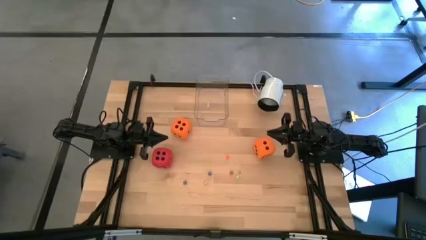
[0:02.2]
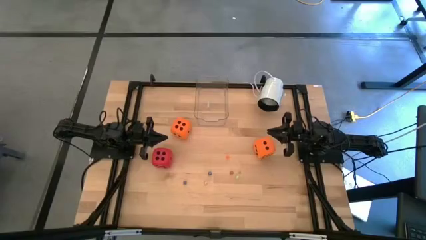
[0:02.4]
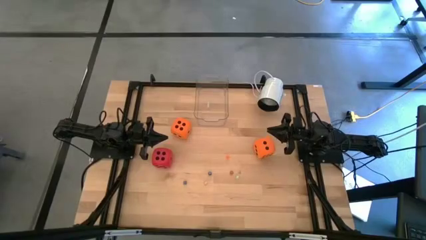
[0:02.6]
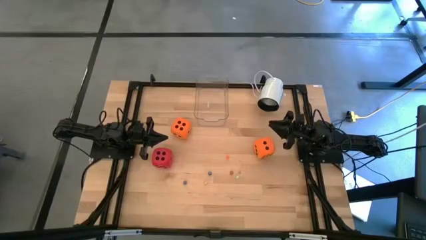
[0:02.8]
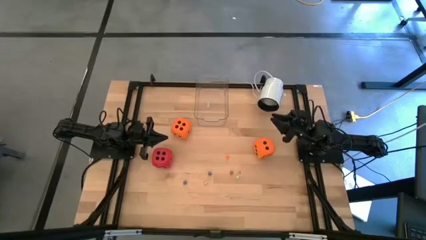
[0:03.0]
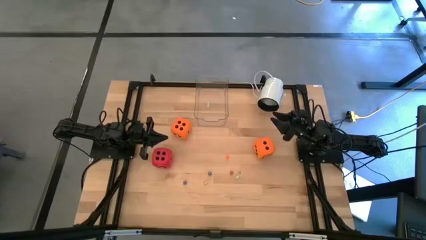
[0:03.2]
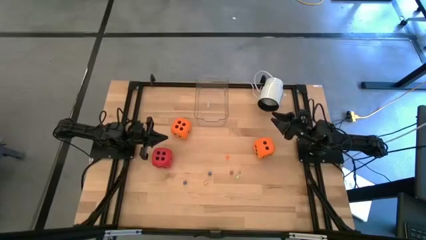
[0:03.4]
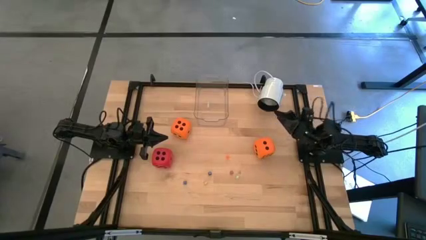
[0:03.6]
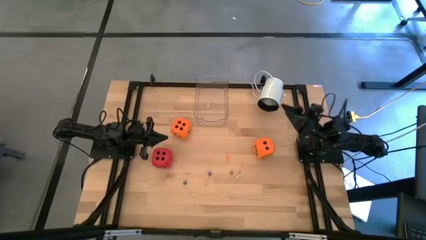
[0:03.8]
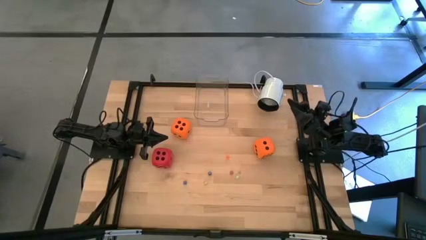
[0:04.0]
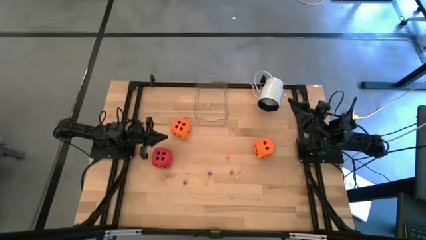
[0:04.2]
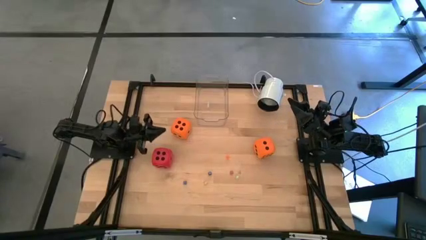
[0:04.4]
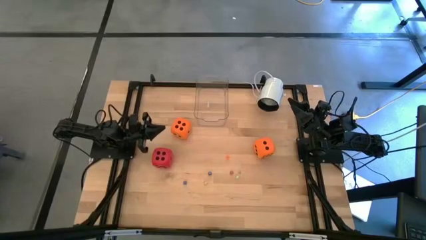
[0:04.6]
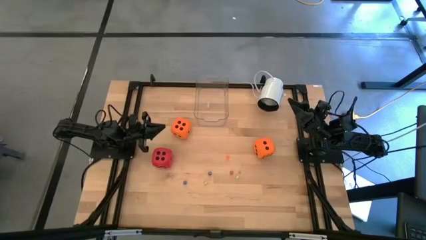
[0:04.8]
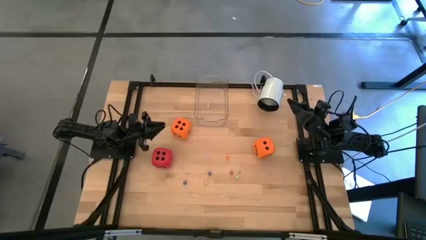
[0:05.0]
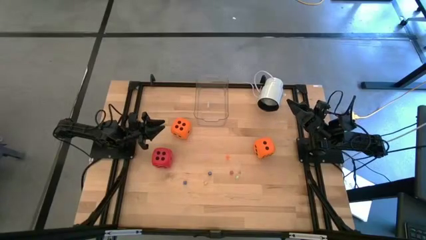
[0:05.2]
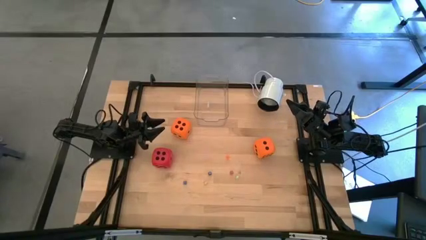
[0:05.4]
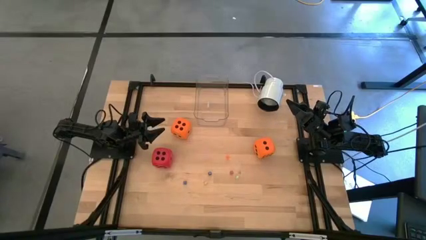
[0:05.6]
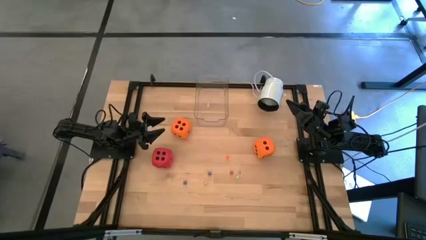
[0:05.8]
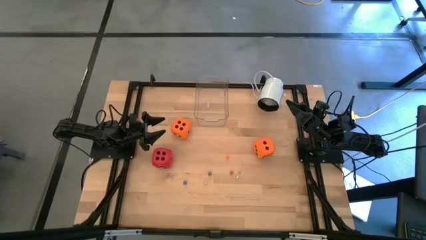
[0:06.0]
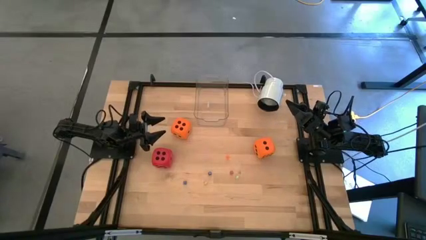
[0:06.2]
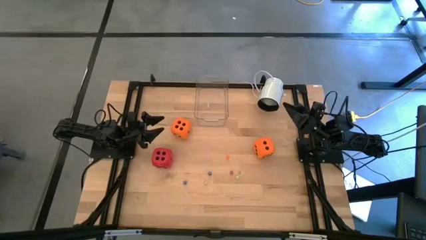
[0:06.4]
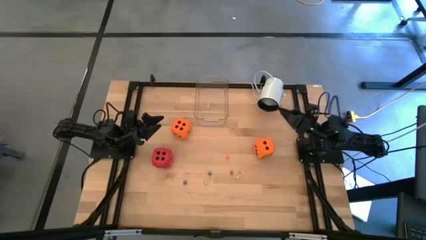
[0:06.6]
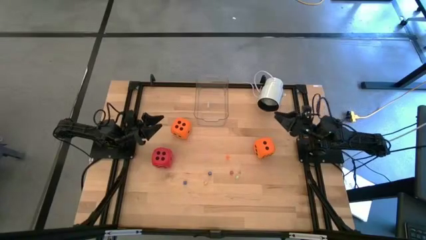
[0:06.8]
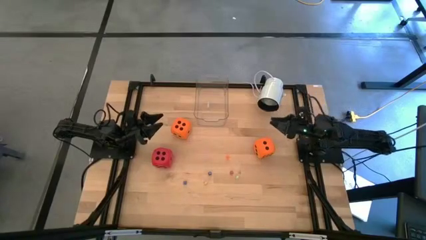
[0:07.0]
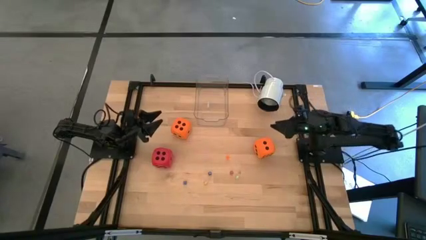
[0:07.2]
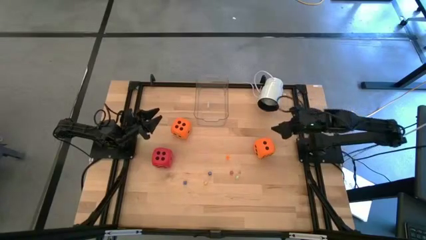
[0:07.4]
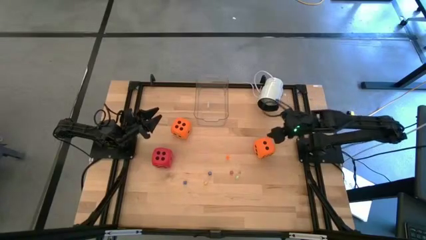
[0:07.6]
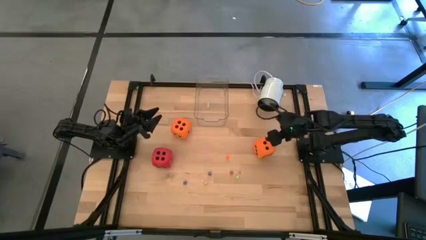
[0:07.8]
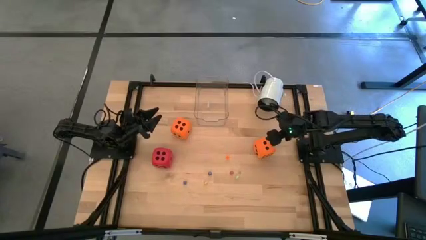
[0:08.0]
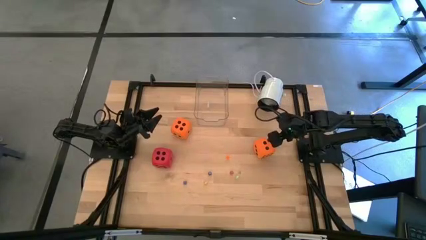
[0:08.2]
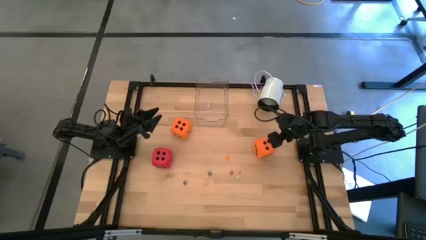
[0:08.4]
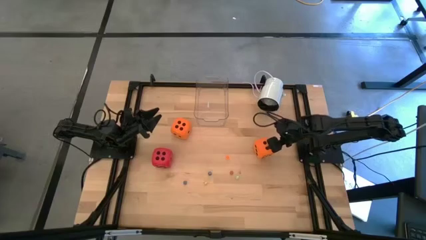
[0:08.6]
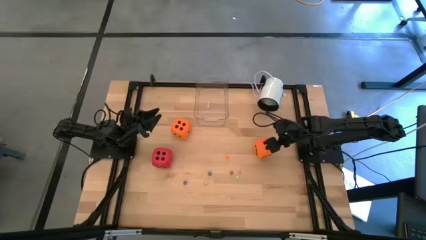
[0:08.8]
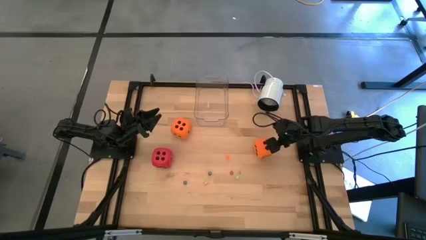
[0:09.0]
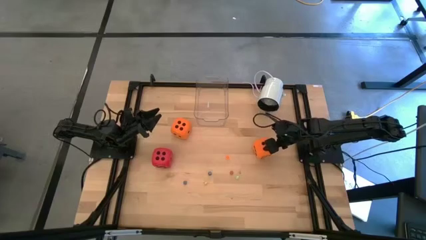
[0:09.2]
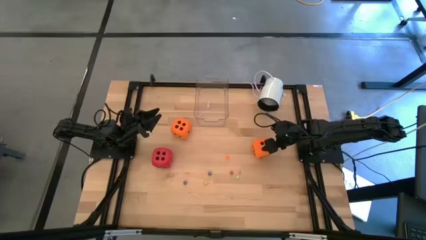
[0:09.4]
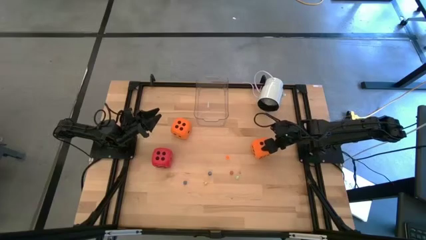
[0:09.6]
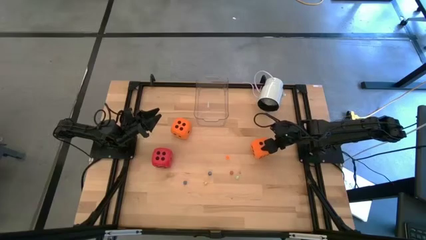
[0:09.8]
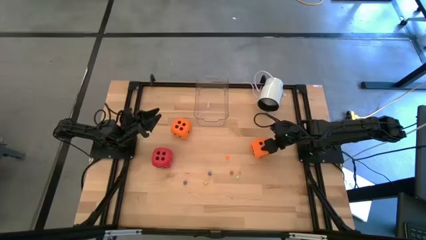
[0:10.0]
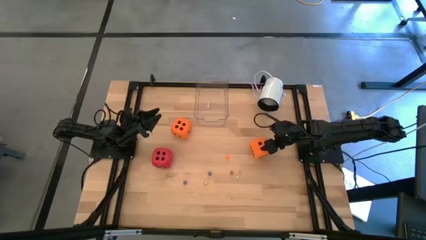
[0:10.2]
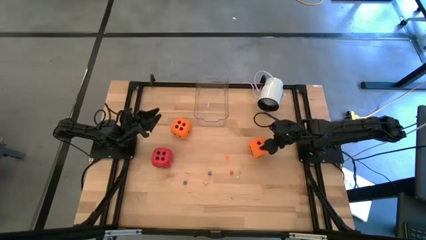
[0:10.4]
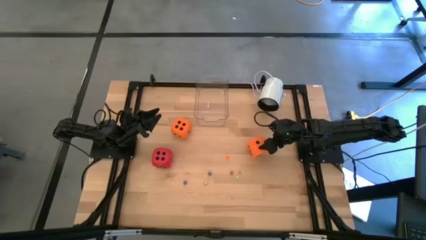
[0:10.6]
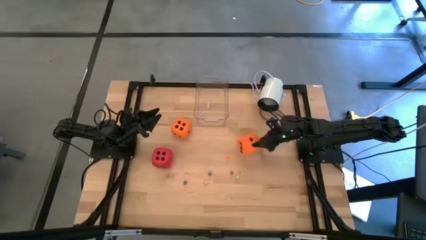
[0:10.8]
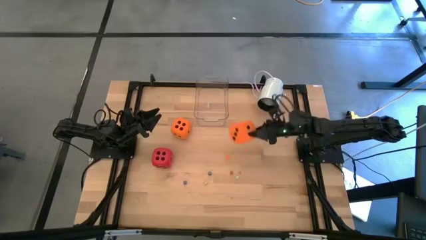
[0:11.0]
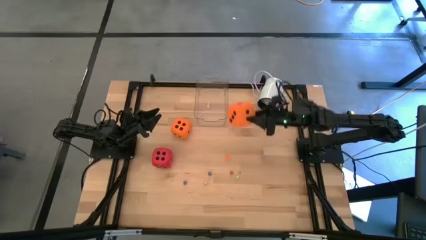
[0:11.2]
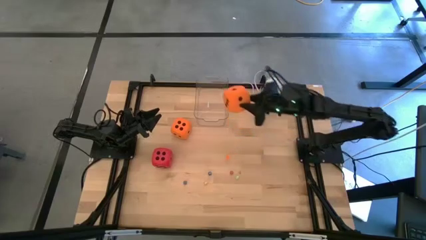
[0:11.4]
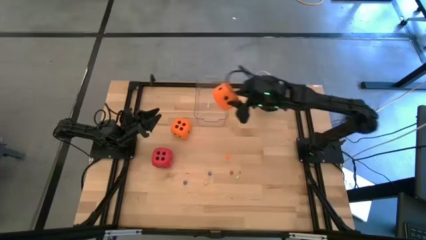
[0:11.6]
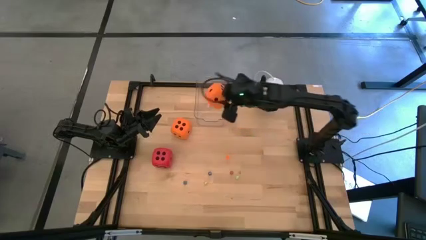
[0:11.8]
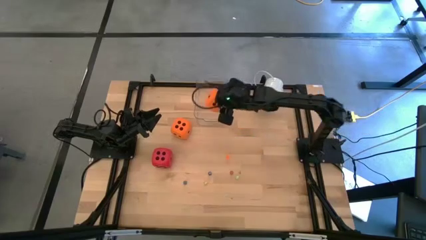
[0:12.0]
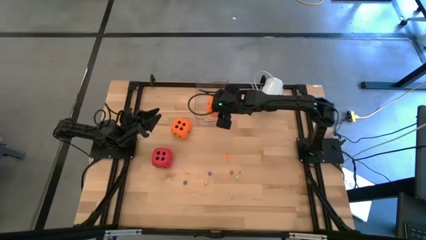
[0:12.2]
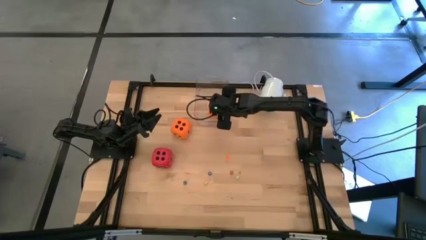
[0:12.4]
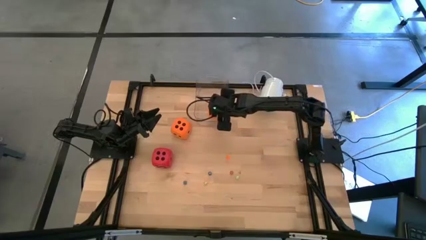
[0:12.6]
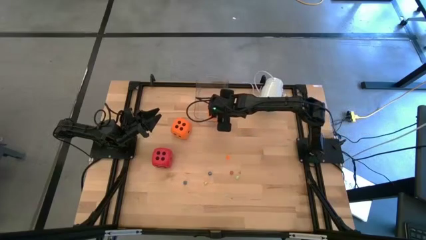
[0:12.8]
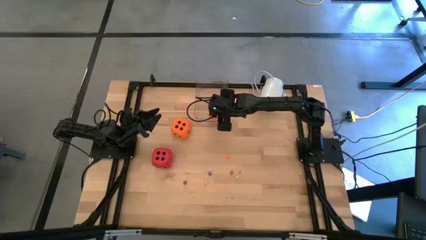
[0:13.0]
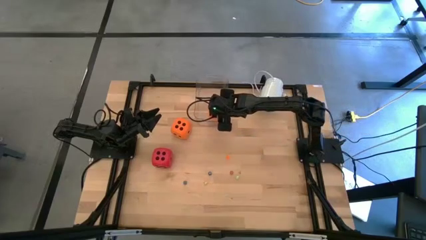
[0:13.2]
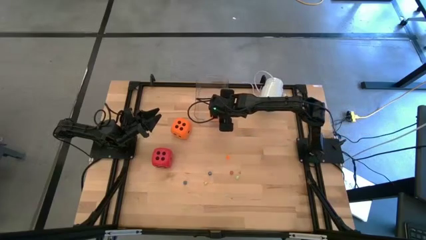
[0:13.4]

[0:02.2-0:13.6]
Task: Pick & Place Dice
Put the right large orange die into the bin
